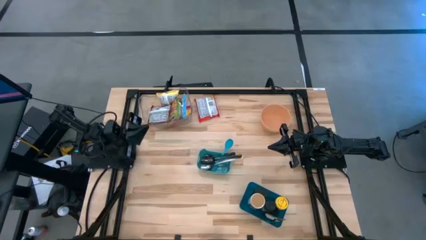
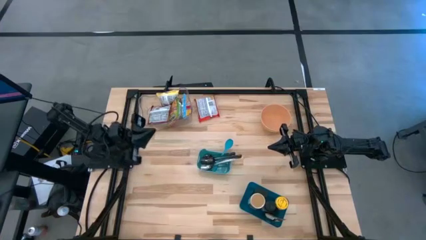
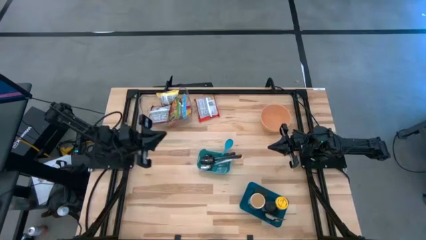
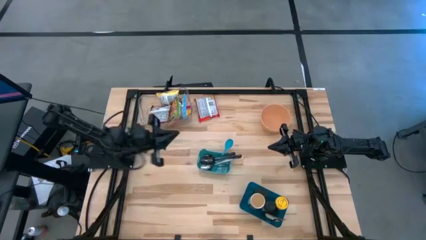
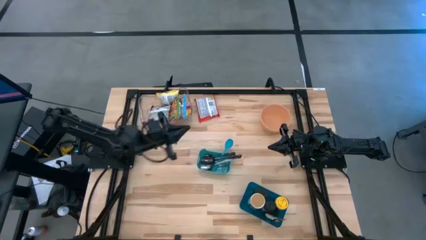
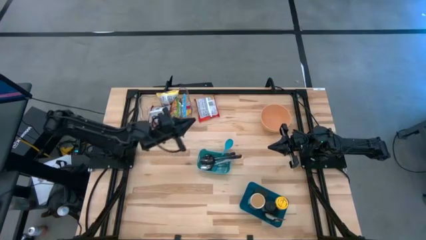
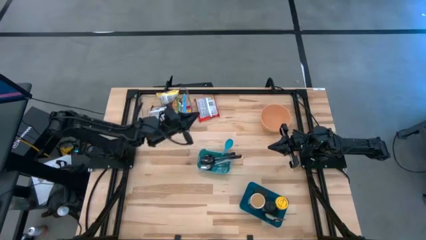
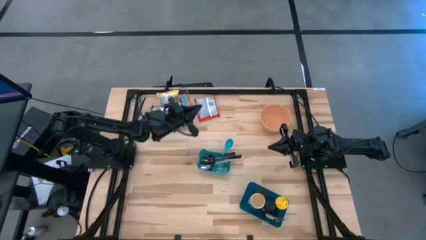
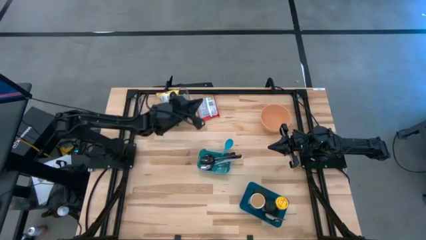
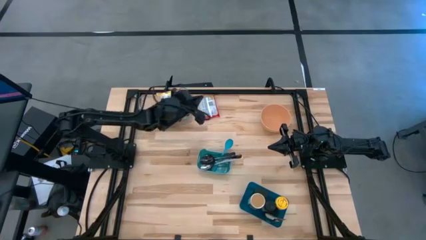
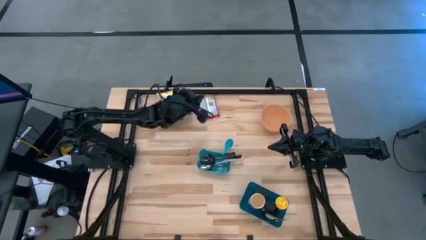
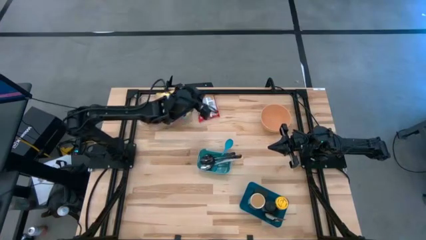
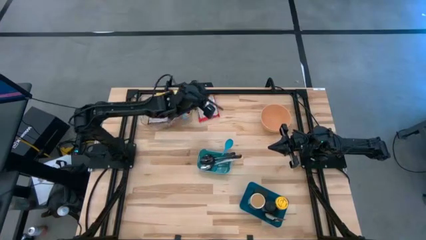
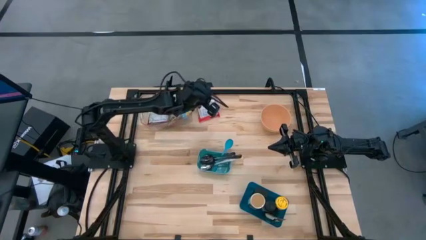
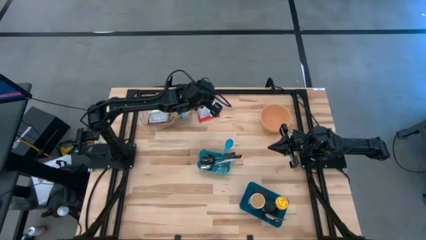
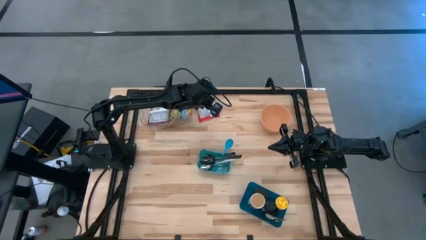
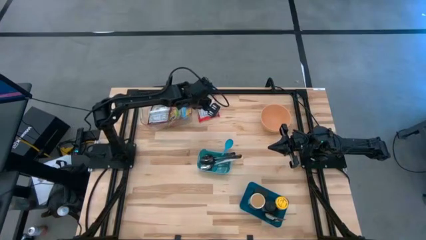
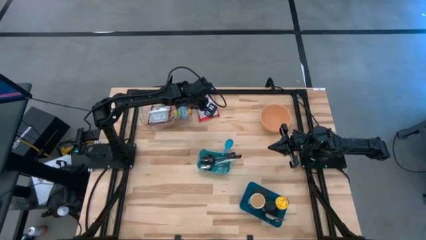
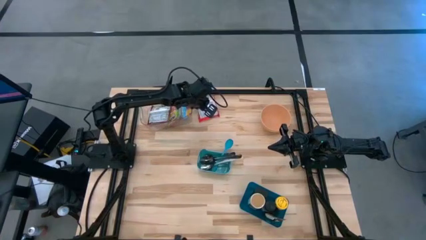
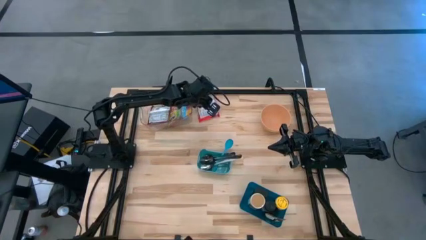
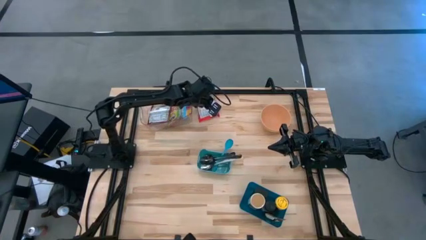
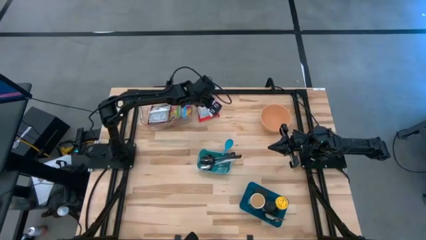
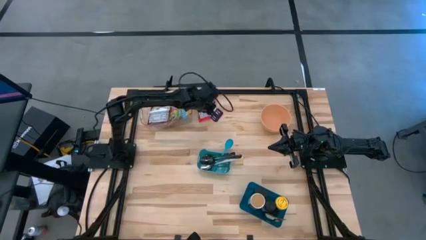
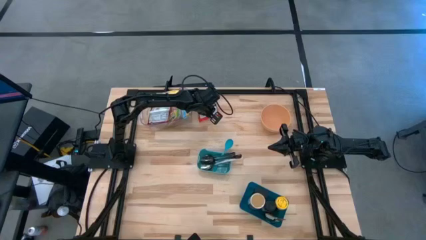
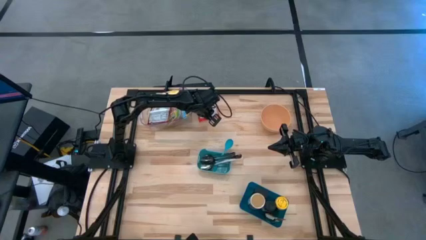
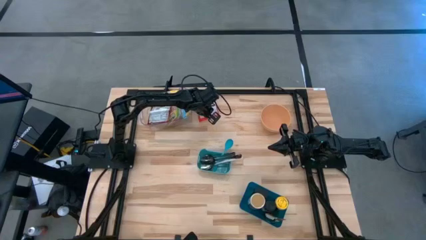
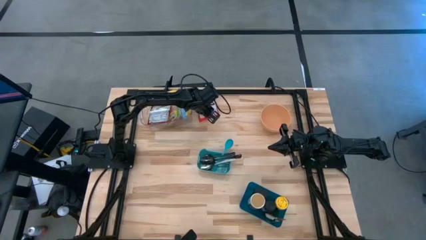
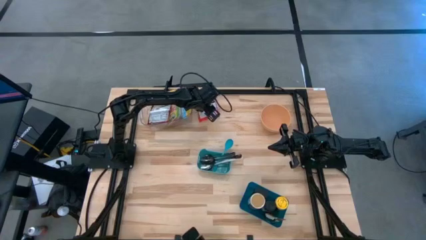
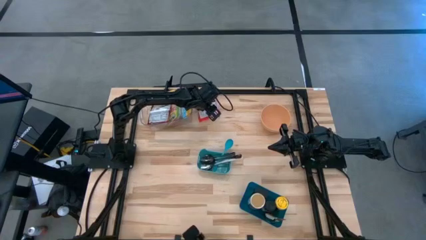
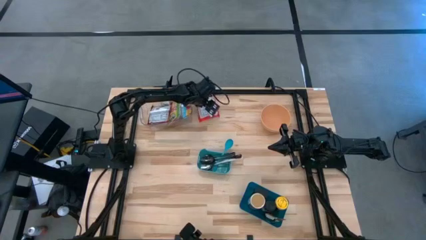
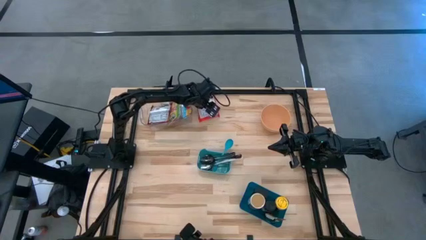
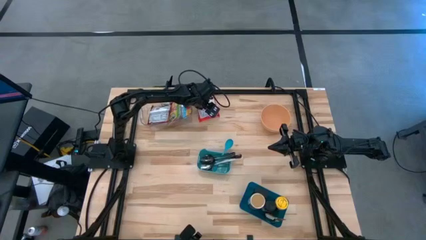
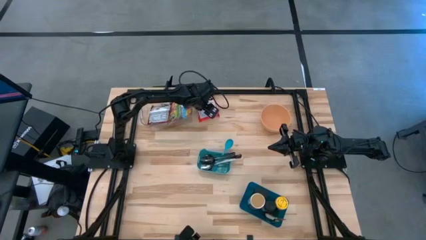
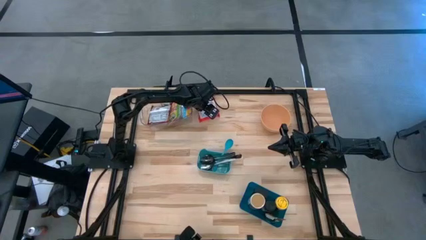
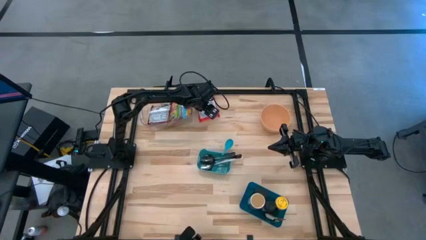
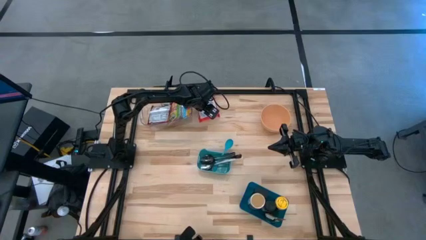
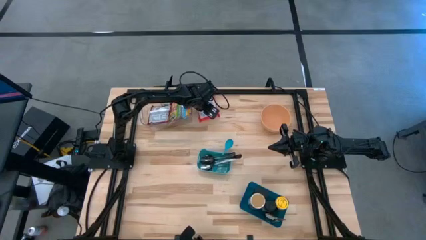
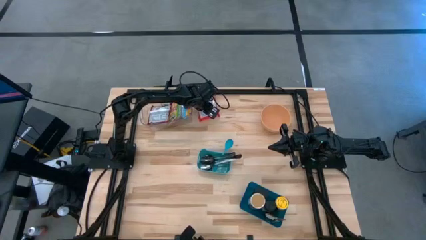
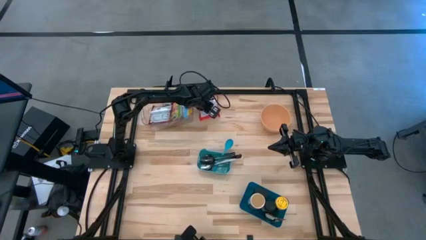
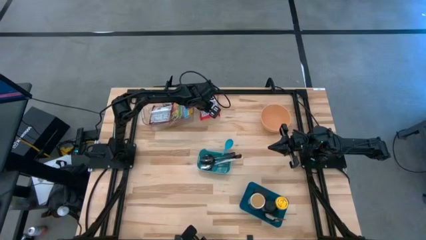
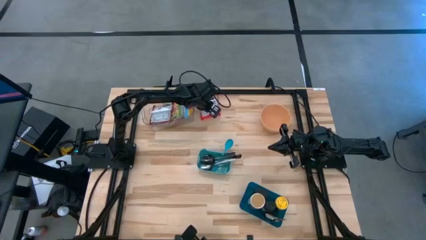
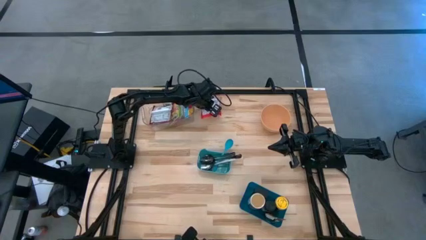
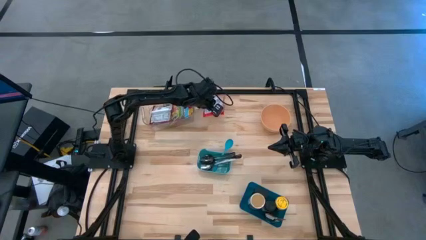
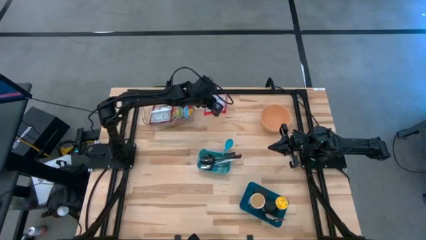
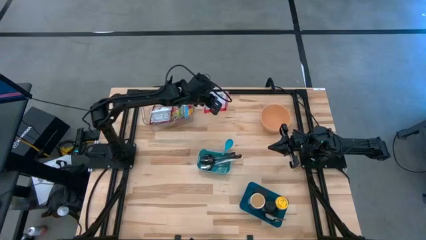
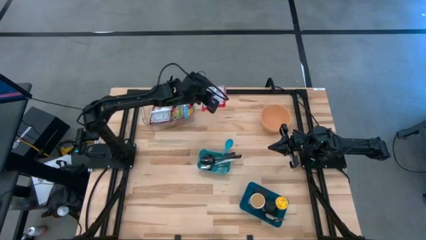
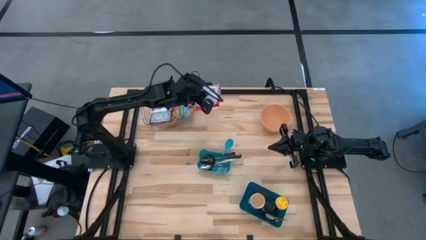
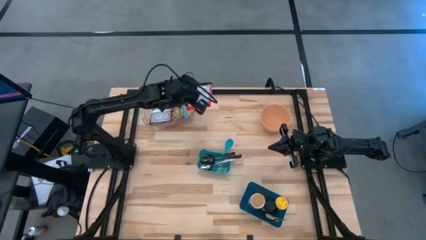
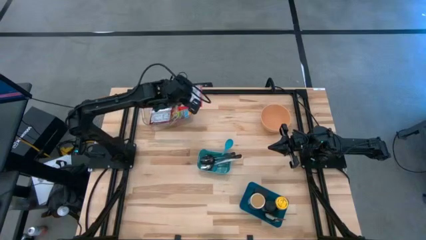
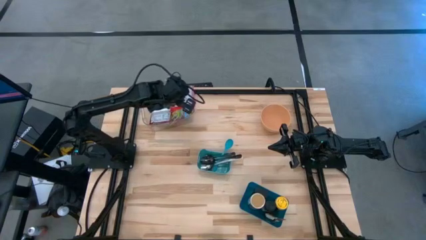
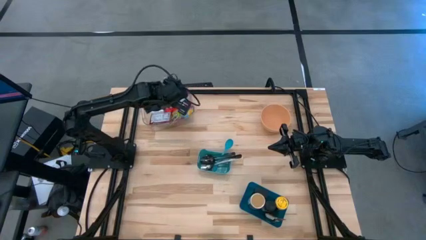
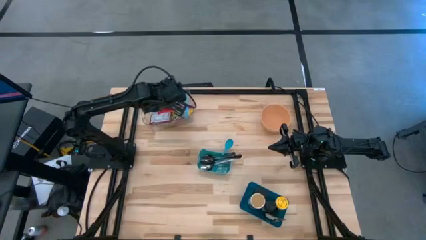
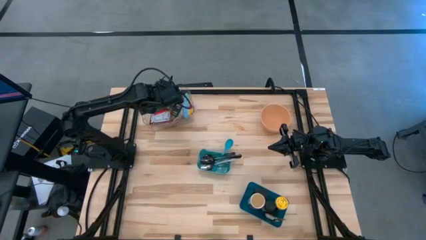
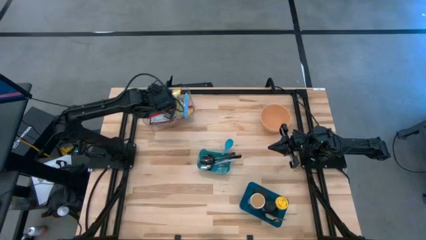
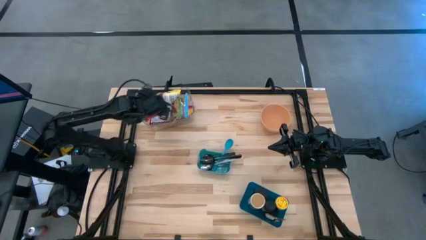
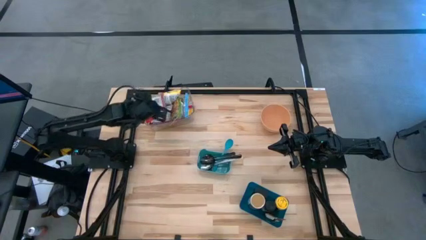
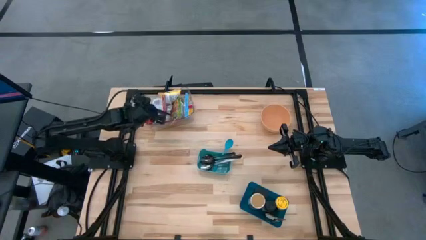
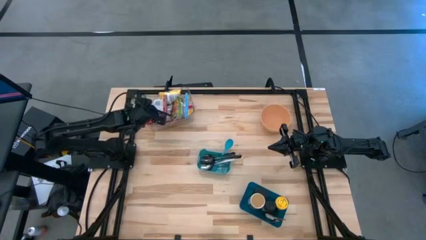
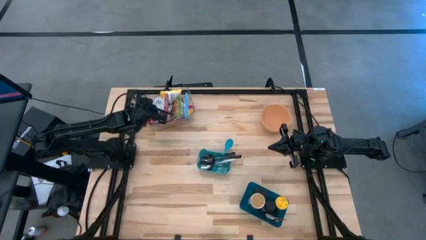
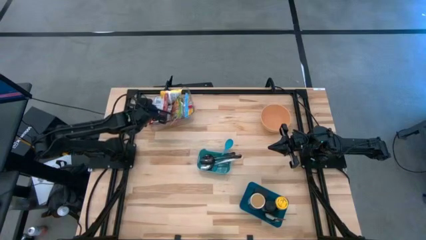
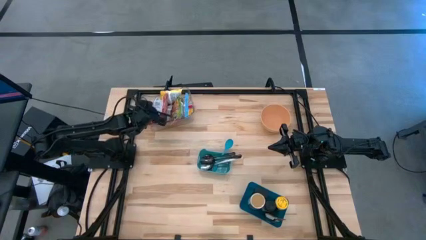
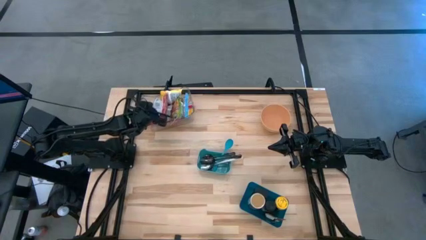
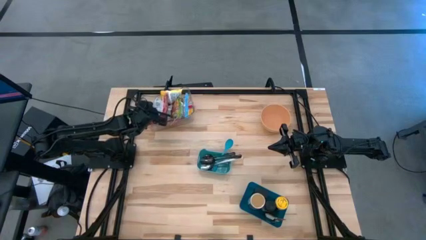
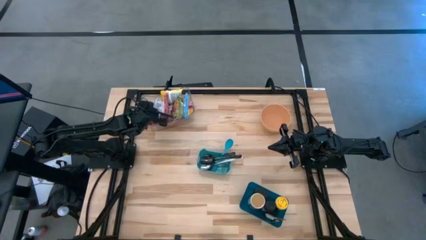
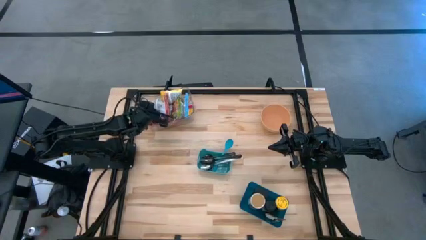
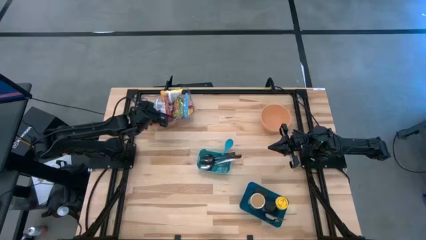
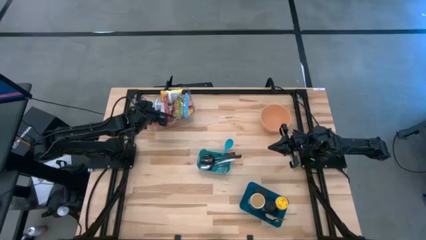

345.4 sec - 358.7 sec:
Task: Pick & Place Food Item
Put the red noodle pack into the transparent bin
